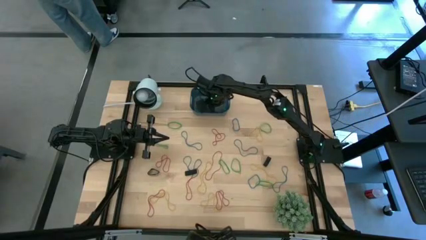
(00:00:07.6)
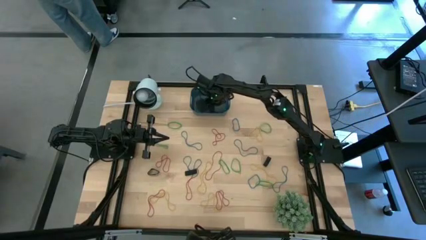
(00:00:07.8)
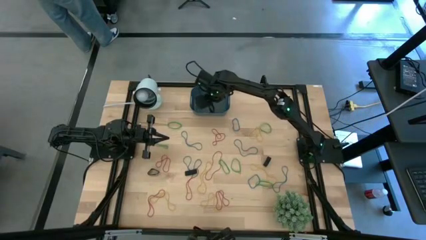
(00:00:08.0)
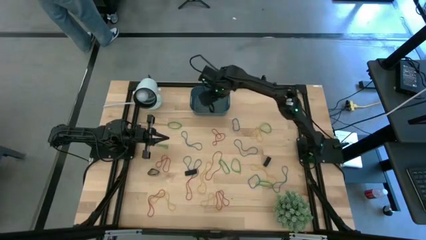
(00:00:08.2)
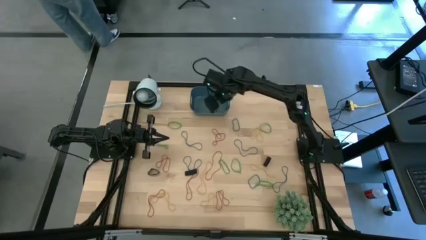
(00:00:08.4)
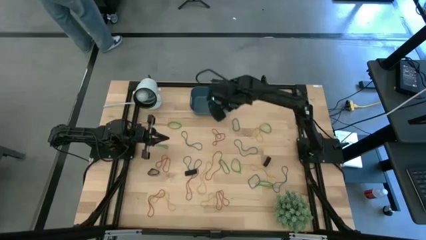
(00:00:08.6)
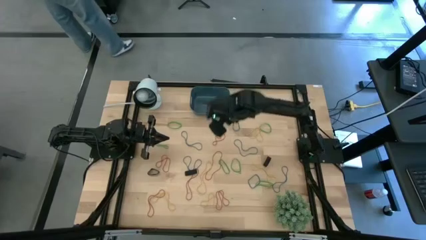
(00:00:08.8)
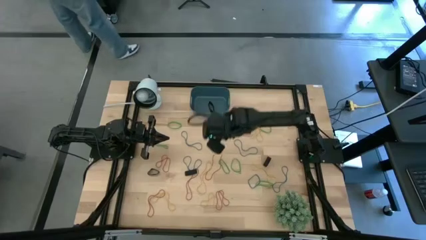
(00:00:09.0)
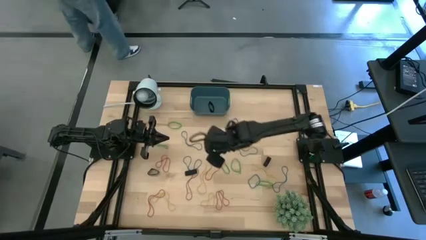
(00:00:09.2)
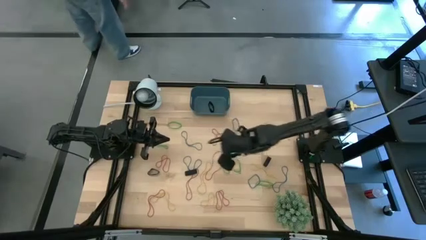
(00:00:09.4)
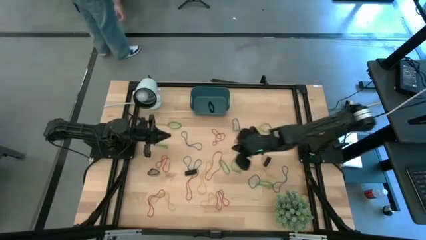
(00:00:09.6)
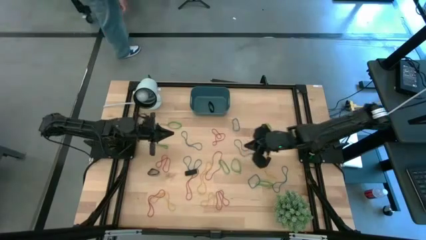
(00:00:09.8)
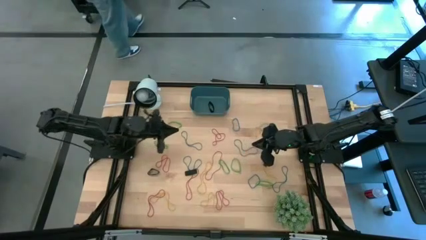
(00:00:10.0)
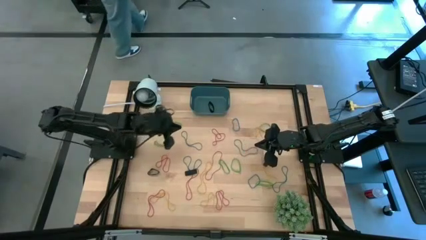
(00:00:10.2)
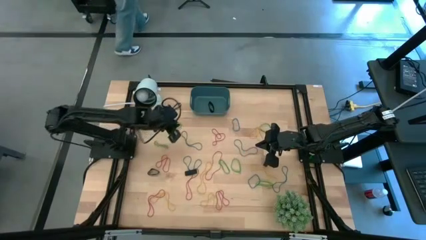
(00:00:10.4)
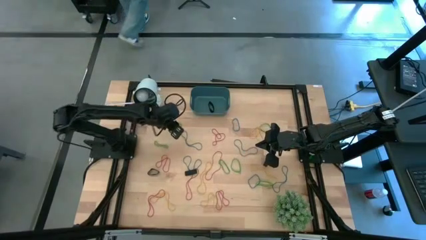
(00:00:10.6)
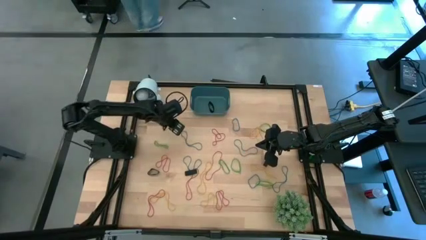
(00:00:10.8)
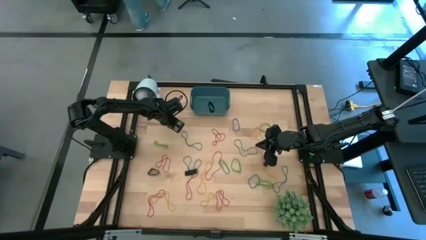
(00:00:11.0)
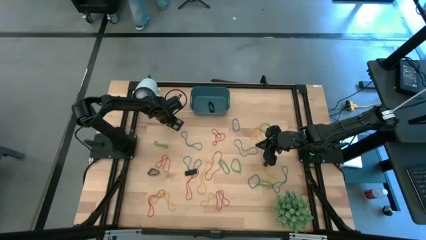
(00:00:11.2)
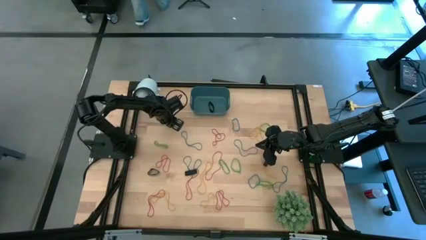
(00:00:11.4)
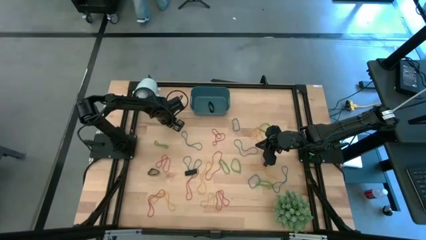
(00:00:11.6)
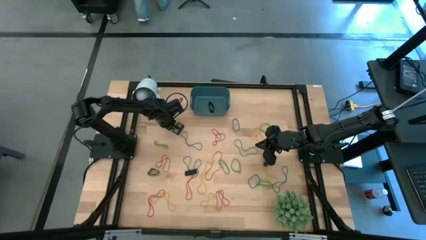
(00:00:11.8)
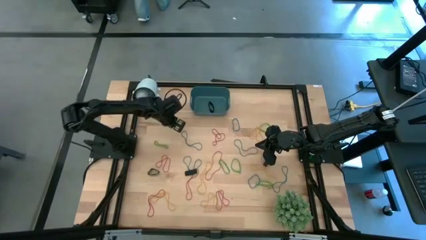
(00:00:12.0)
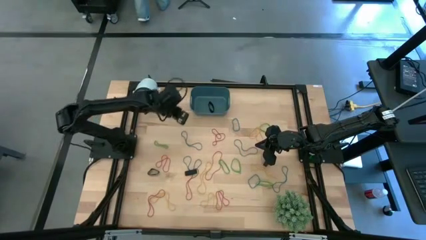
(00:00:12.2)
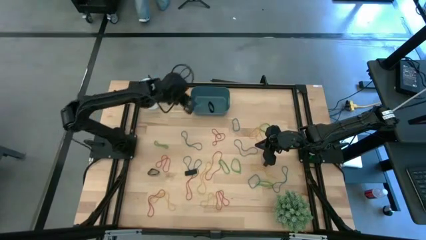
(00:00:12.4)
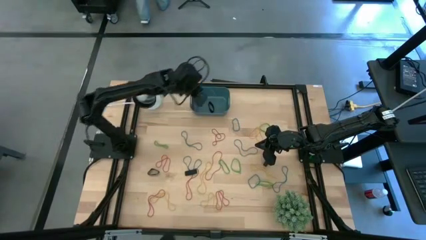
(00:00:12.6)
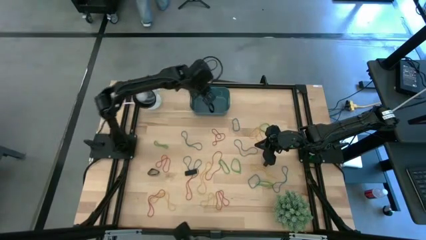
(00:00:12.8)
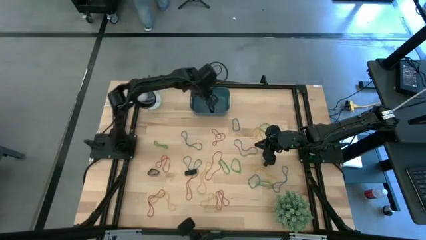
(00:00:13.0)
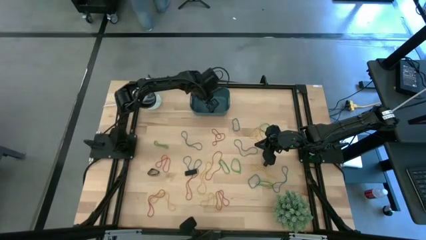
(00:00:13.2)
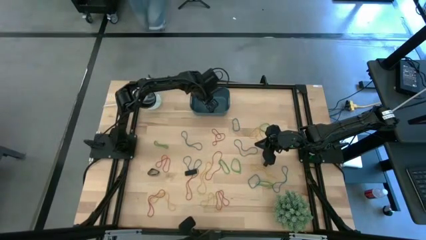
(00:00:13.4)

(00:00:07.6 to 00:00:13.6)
Task: Pick and place rubber bands into bin
Put the green rubber band into the blue bin

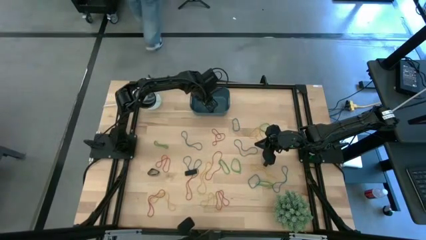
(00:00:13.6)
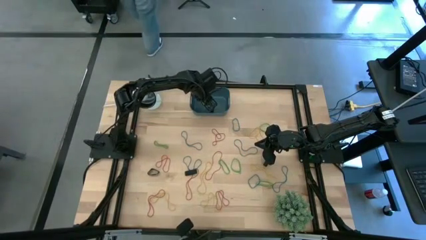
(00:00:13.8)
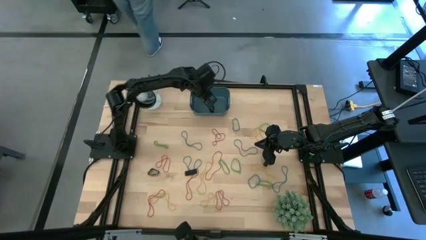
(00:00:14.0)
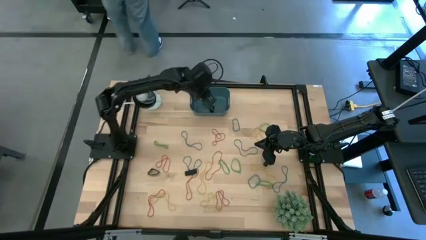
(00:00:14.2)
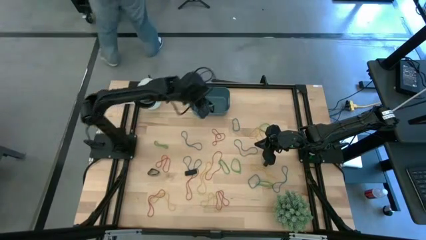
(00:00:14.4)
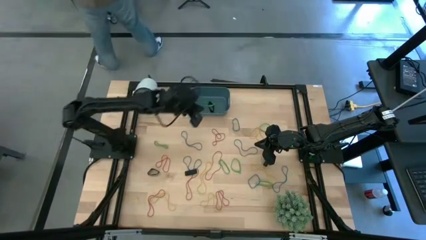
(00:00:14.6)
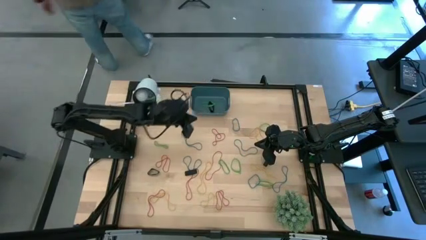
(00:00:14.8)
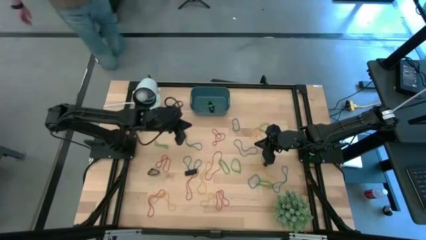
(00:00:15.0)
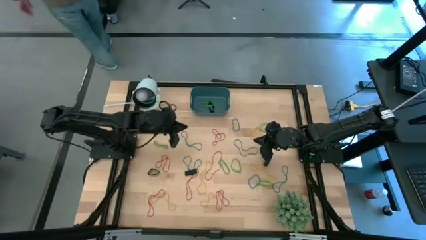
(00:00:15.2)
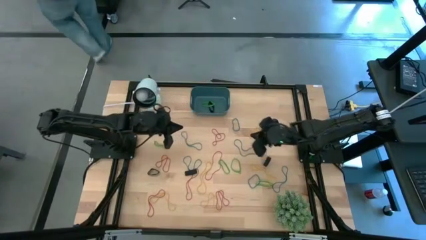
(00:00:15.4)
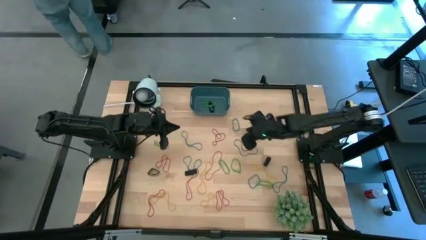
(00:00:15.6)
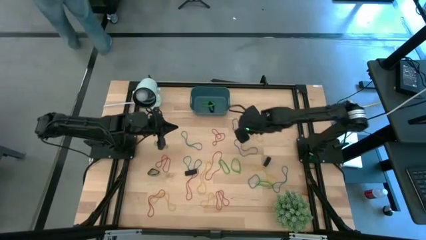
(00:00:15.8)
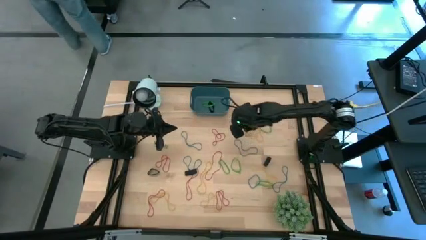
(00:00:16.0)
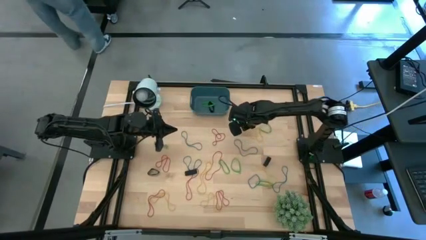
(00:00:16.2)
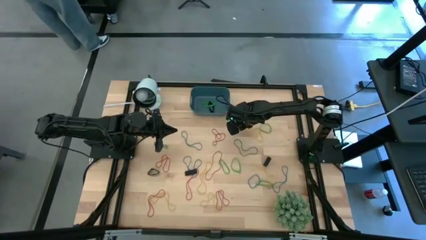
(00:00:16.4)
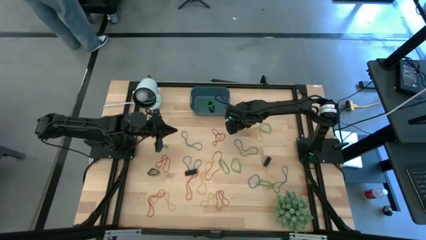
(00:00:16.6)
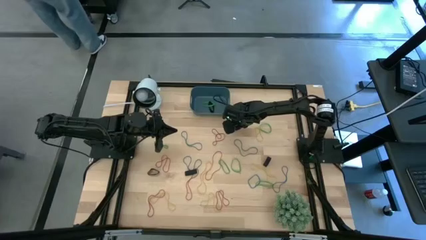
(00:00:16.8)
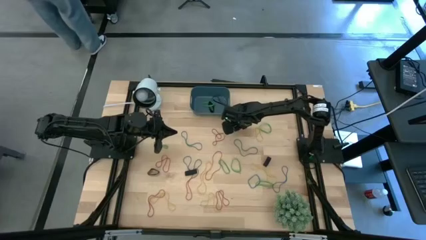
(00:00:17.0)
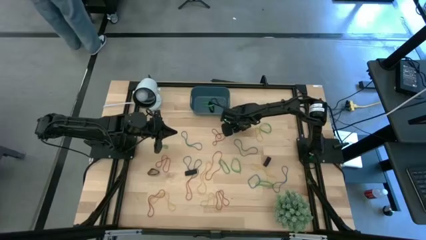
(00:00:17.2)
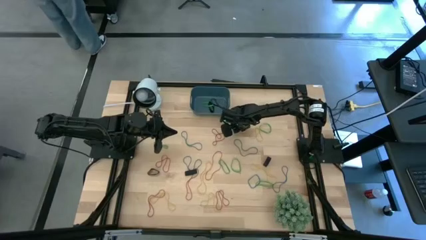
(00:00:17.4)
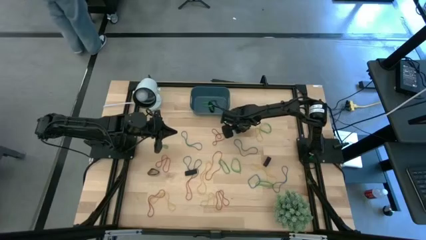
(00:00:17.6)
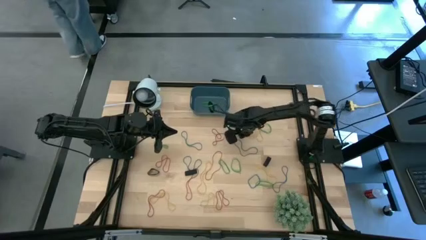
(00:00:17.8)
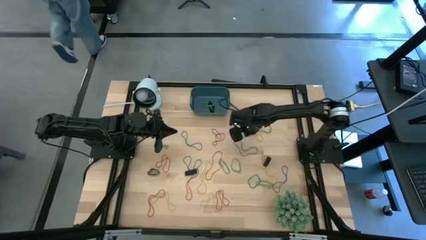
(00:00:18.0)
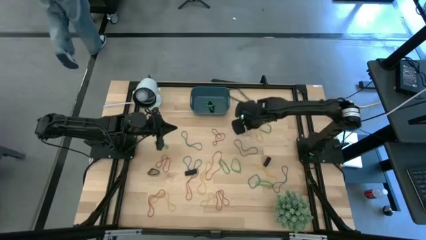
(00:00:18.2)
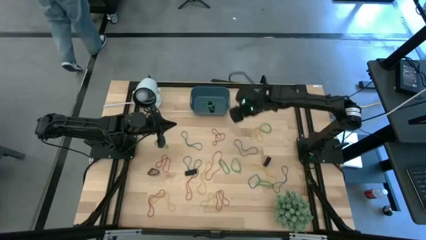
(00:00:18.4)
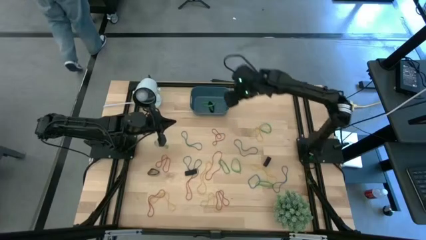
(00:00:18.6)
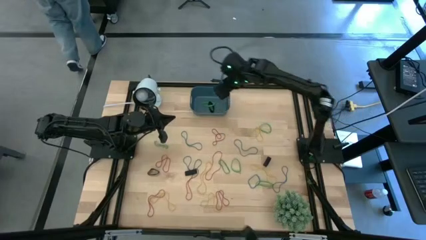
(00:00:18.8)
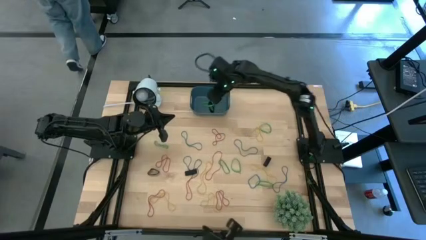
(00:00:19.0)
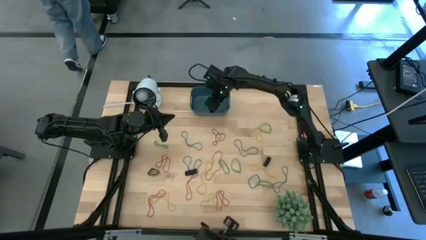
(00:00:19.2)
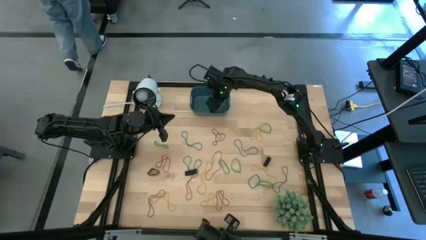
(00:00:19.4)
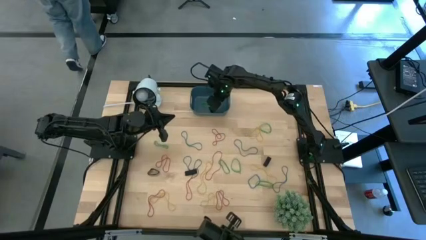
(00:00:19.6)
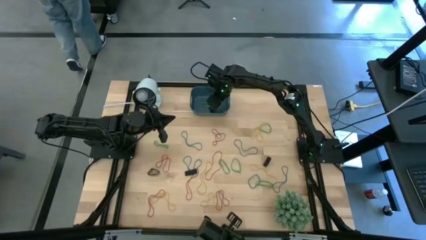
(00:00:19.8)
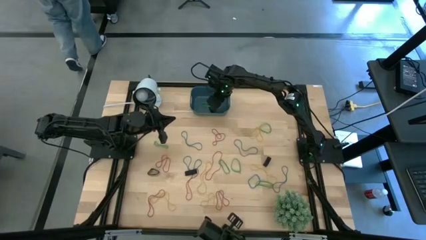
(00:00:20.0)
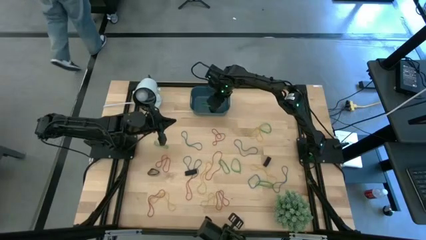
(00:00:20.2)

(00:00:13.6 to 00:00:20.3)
Put the blue rubber band into the blue bin

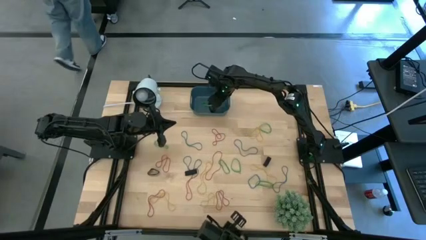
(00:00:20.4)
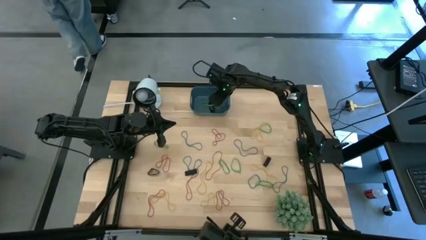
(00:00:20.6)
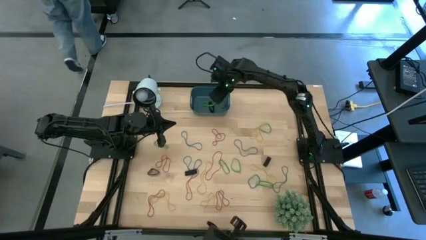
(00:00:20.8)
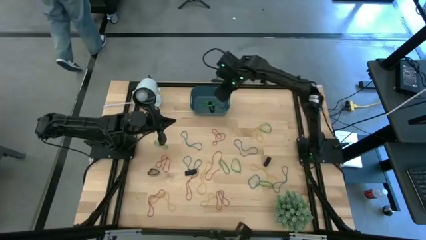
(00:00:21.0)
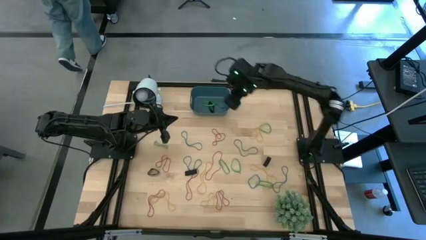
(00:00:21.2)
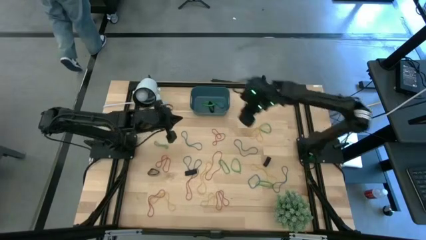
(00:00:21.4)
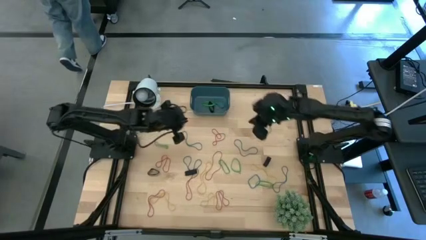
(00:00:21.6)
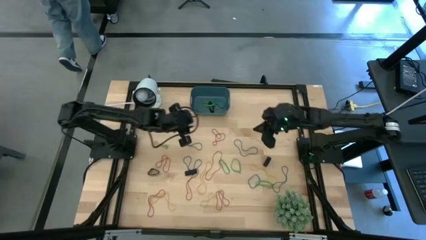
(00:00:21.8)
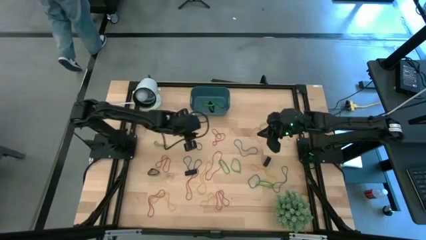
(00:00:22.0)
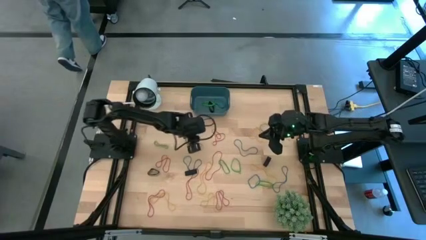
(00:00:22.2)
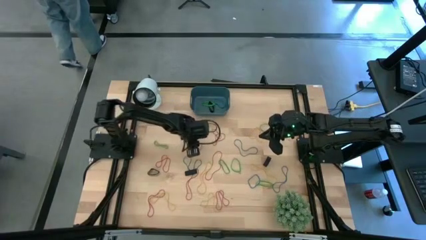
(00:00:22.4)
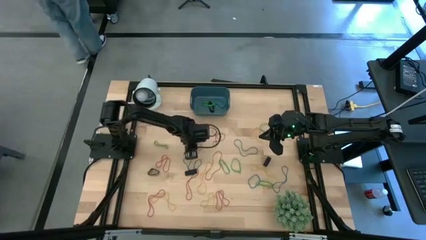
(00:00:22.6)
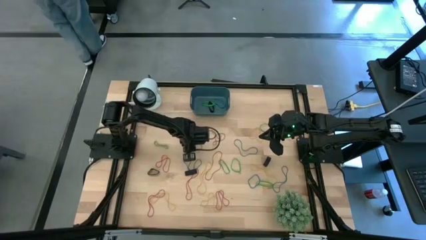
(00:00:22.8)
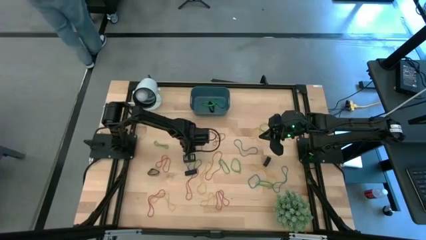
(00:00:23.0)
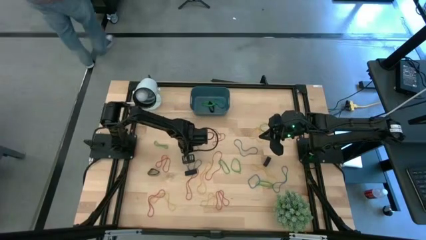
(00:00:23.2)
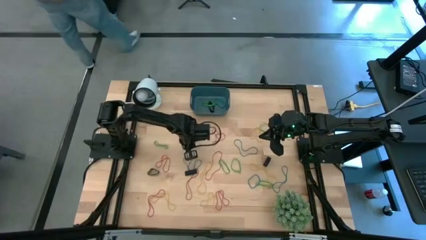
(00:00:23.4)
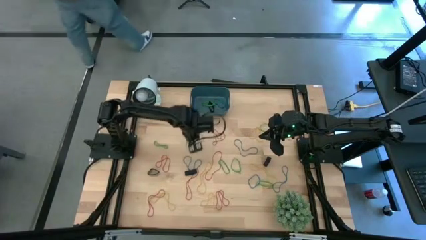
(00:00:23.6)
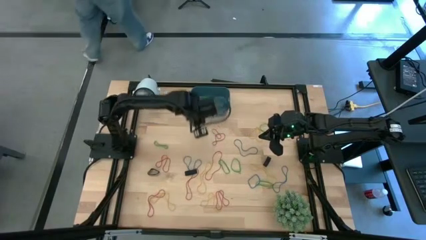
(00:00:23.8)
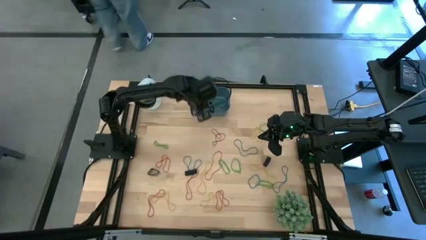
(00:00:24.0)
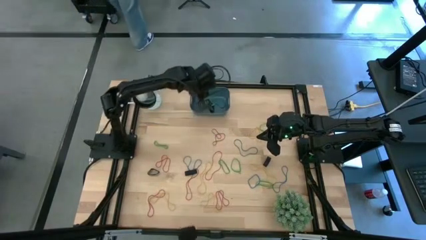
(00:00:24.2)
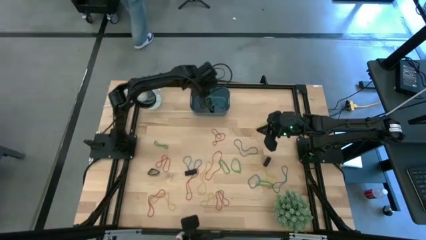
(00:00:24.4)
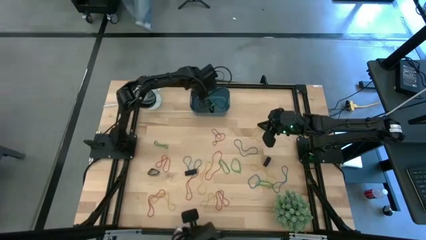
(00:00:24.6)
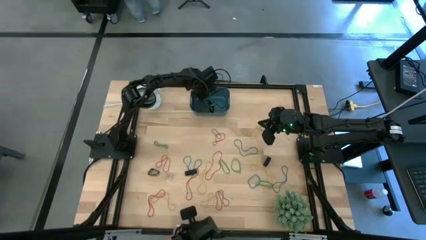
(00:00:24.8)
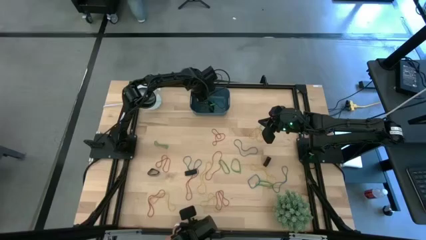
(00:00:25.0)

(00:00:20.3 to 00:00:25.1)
Put the blue rubber band into the blue bin
